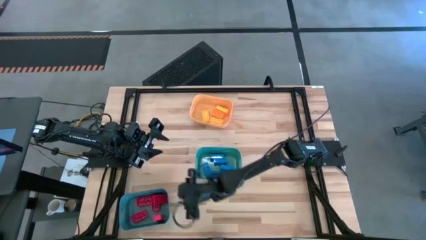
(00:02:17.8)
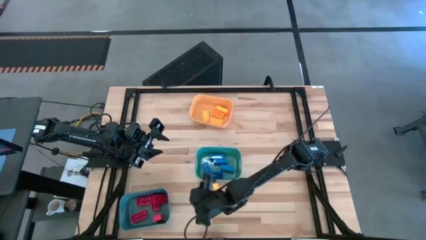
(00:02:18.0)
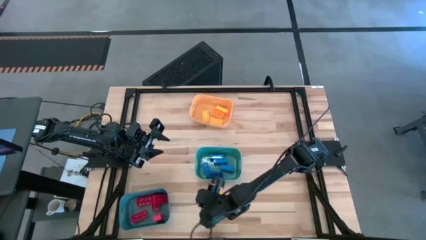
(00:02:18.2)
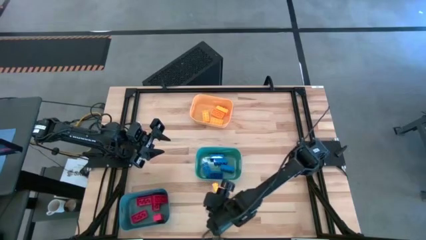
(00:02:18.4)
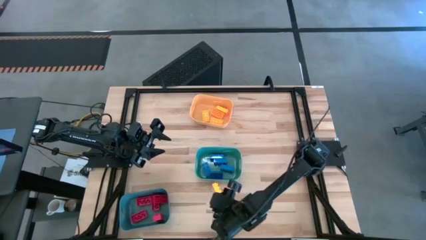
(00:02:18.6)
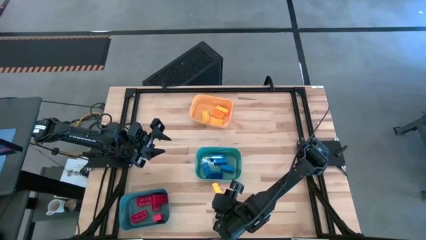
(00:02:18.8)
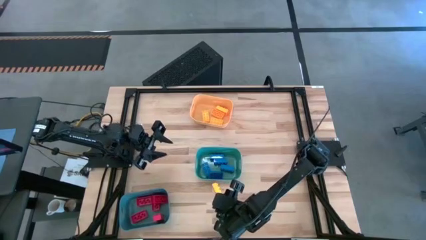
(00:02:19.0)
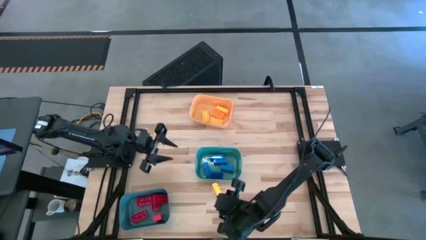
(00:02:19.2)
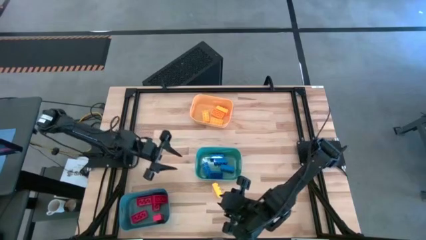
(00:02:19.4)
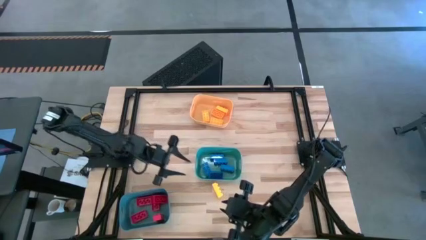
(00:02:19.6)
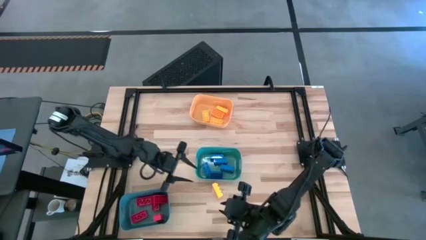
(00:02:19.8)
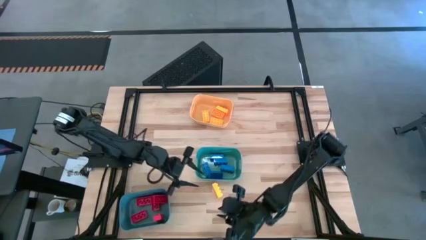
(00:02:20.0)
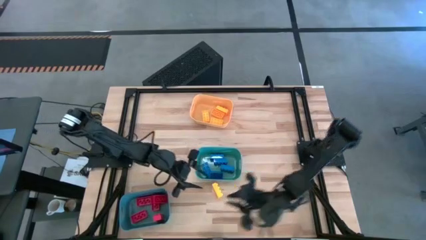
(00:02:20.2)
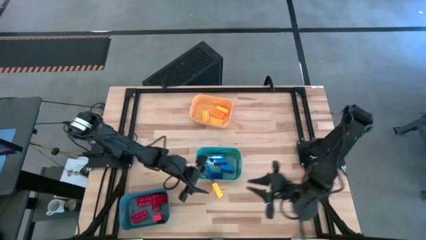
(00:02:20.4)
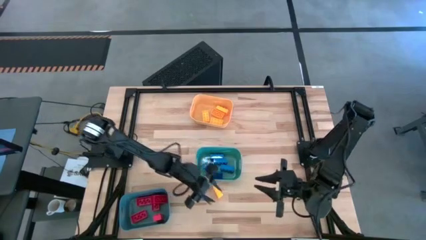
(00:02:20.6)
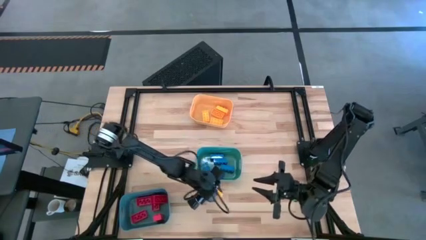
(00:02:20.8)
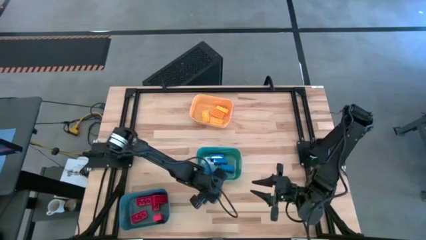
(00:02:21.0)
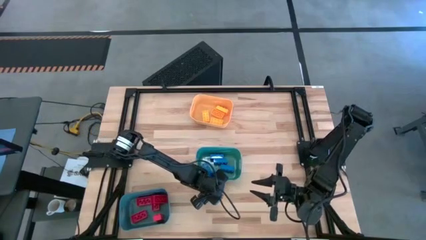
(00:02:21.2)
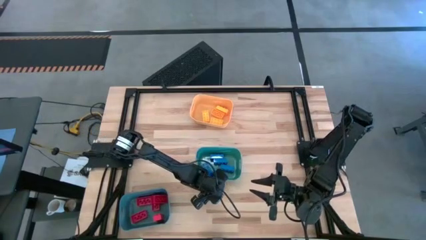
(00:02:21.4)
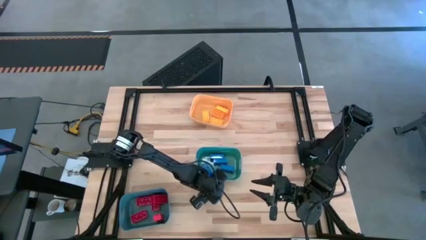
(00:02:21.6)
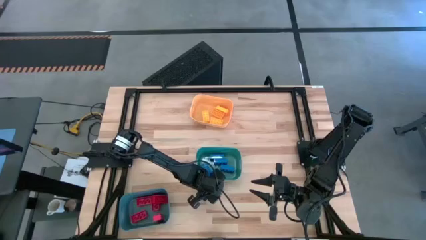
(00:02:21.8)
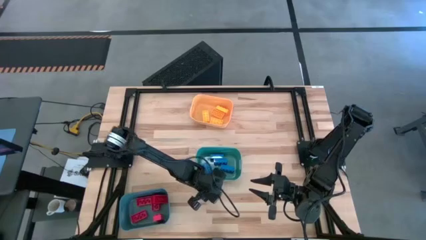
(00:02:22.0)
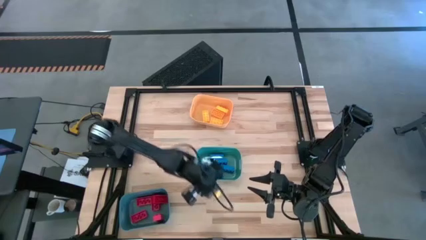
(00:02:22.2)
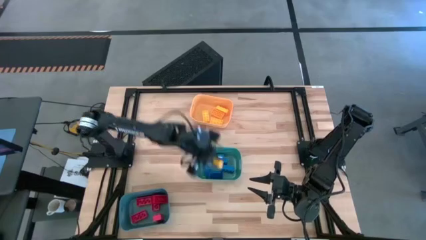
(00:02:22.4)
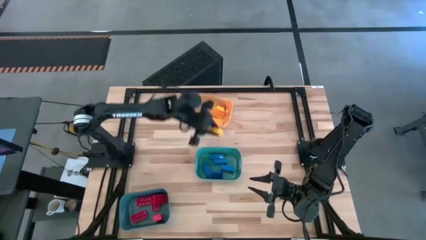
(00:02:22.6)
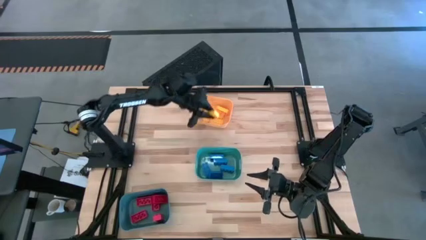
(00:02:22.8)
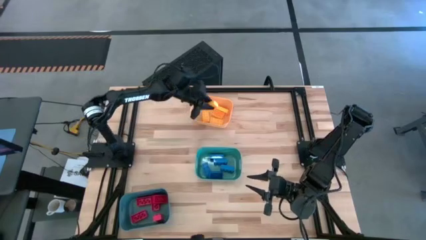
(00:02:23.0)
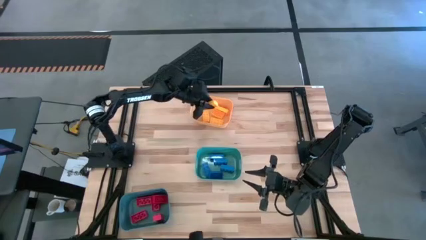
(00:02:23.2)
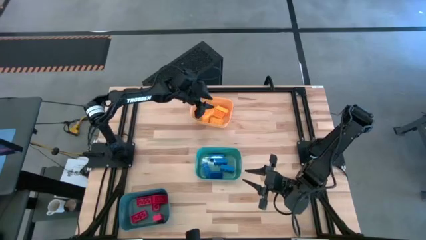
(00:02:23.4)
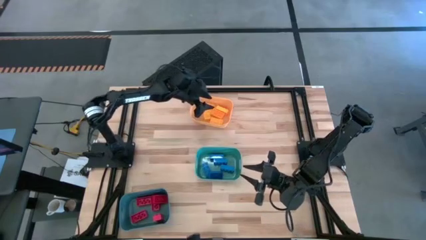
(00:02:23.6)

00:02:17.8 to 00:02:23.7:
Task: Sort & place blocks by color
Put the yellow game piece into the yellow bin

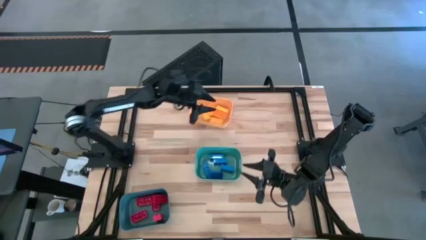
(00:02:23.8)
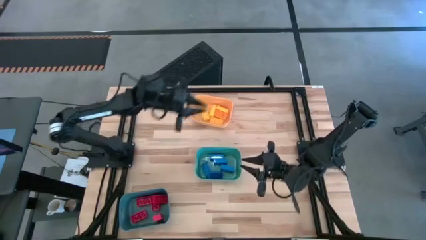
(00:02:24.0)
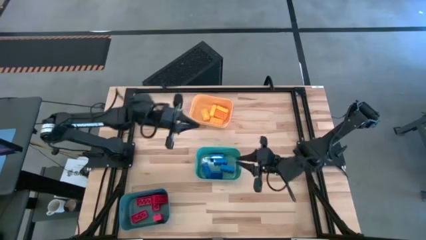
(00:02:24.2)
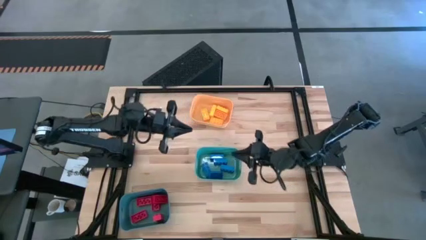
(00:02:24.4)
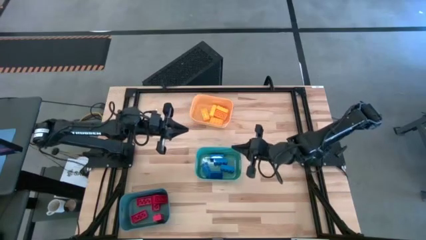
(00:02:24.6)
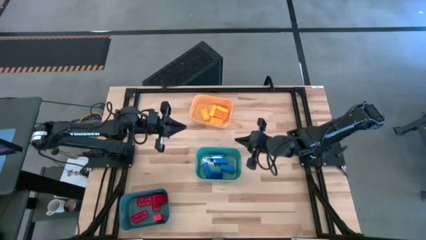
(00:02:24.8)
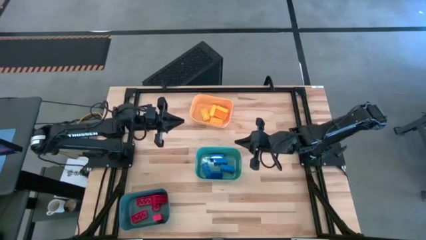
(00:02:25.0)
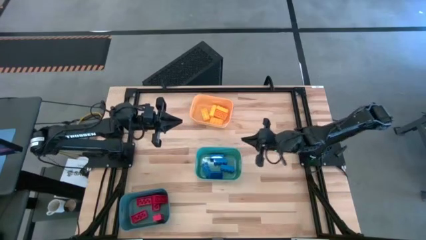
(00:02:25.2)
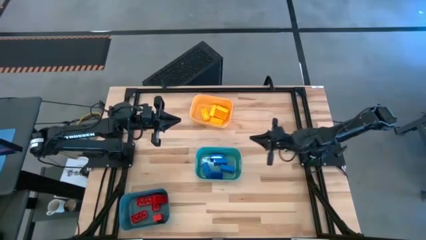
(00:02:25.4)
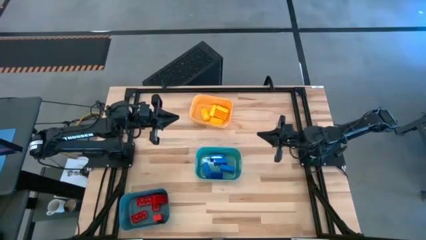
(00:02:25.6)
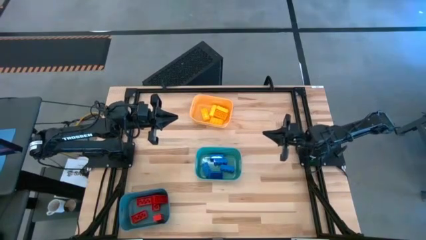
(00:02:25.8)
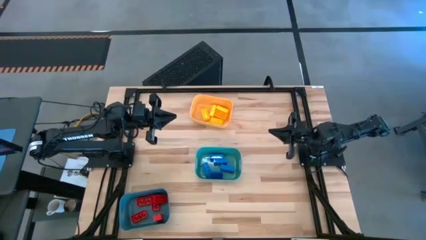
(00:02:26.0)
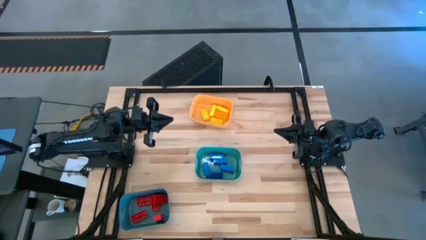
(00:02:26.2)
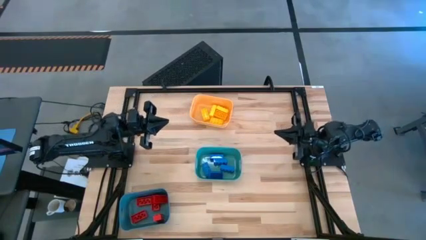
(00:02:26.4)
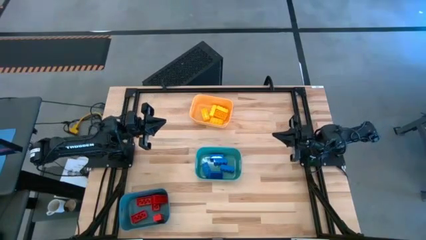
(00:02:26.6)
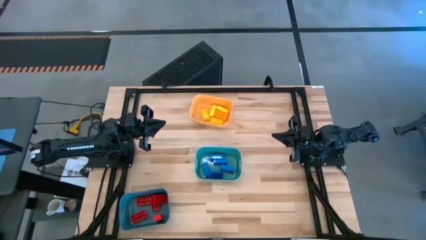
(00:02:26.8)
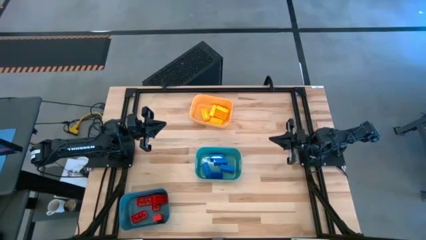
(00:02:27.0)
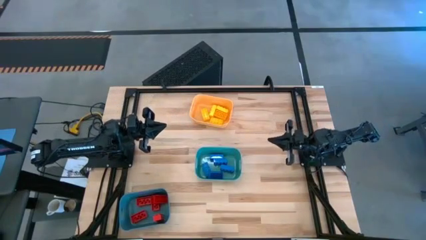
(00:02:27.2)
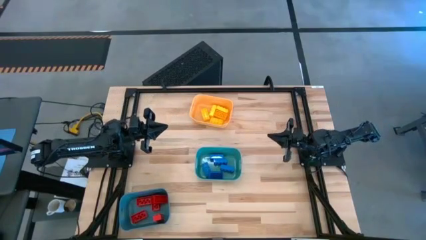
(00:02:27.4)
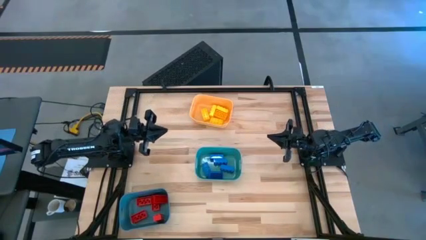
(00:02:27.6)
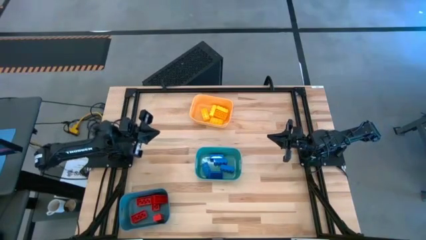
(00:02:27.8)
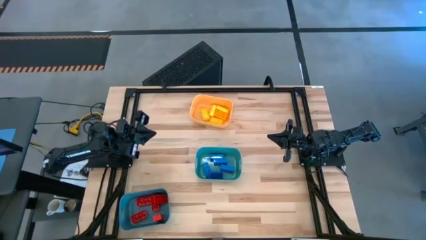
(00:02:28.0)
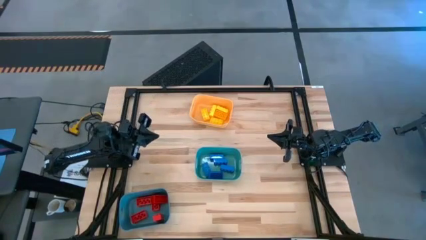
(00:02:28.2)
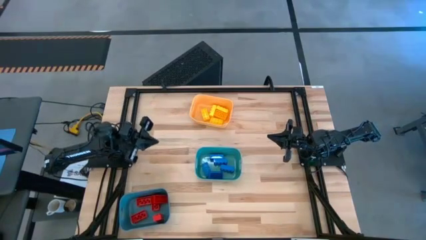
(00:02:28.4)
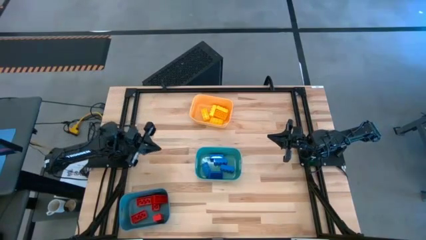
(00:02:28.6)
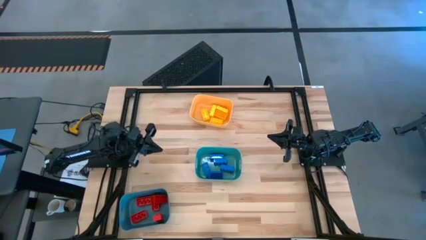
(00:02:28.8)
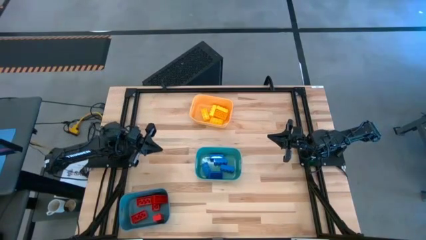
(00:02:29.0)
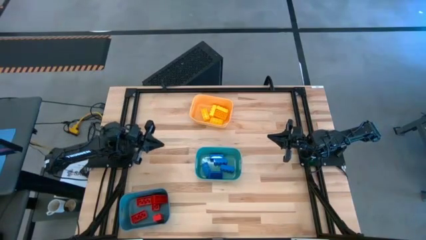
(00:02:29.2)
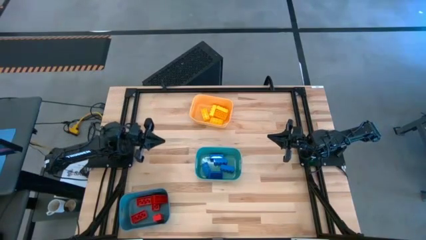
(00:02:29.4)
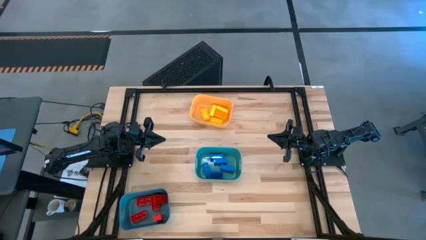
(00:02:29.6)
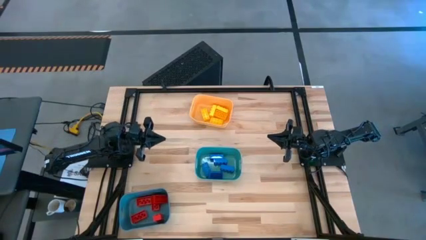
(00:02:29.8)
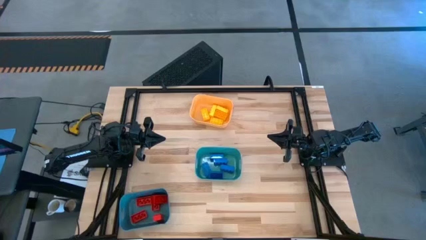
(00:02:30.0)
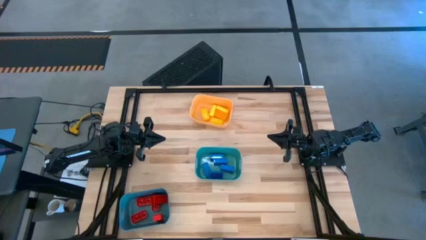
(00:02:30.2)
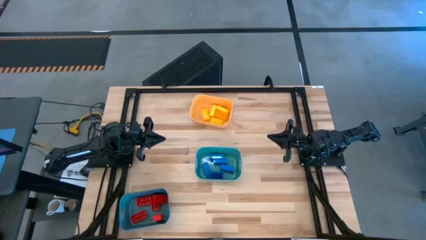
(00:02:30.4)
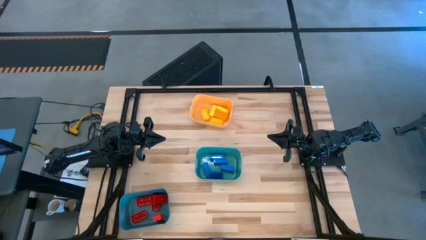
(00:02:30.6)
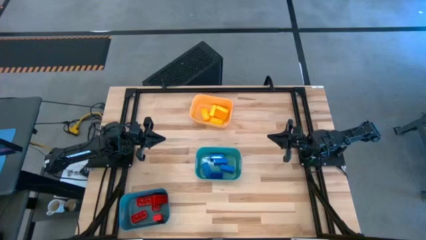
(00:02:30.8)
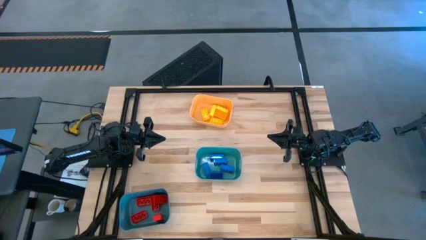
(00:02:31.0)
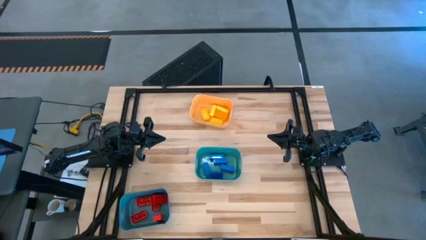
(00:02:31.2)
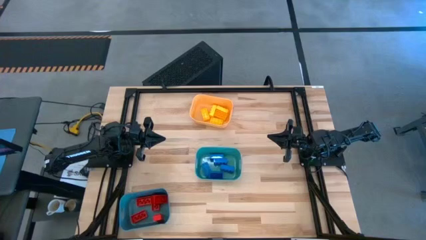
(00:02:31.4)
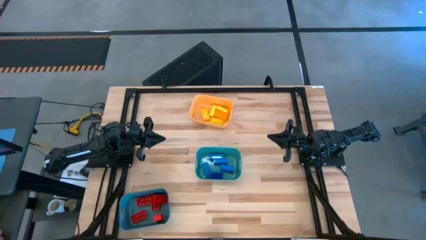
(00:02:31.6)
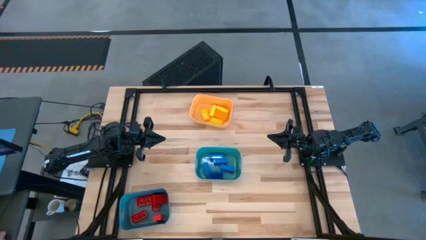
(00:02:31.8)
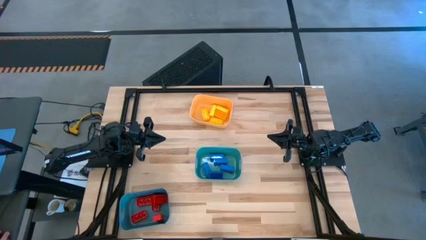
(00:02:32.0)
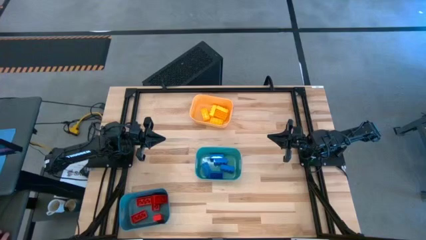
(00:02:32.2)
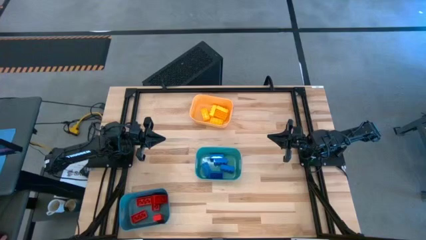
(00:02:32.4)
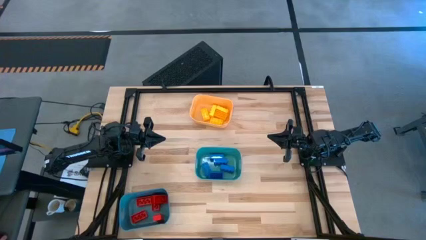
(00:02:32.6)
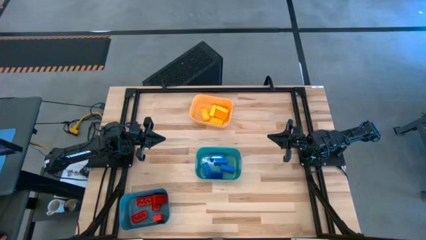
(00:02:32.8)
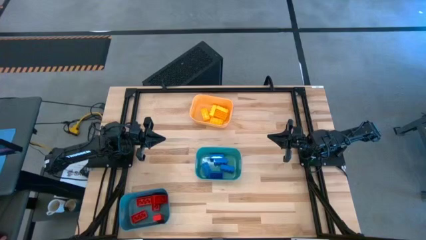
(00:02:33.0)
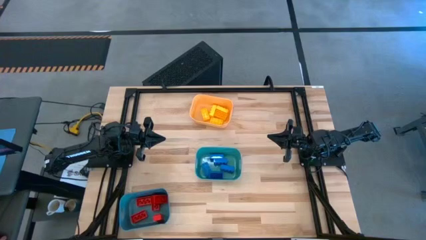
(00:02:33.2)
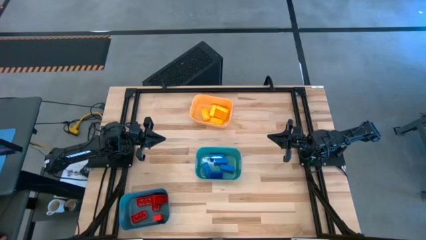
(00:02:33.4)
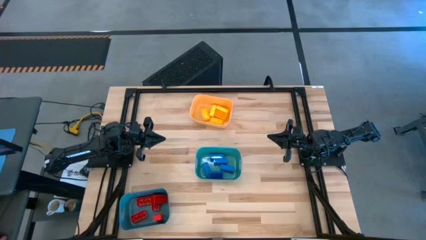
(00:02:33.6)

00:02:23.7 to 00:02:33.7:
Return to Home Position
